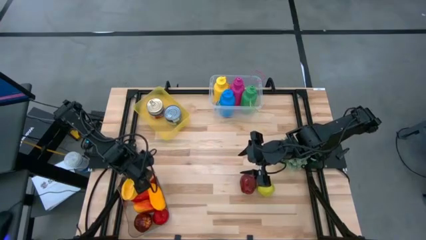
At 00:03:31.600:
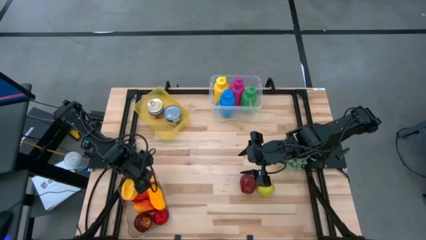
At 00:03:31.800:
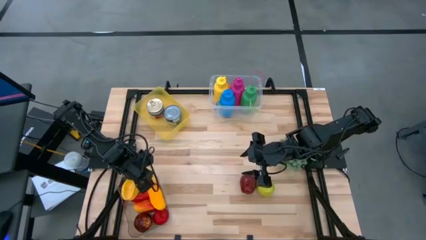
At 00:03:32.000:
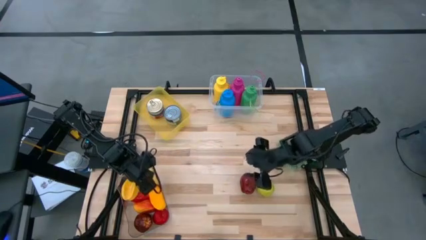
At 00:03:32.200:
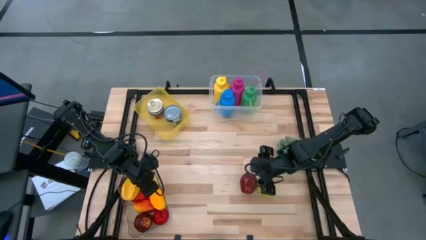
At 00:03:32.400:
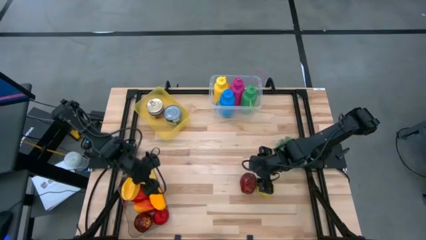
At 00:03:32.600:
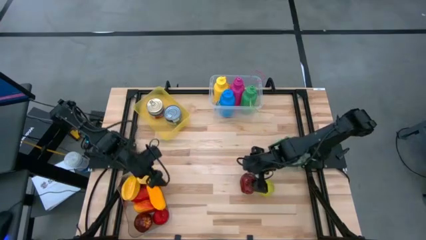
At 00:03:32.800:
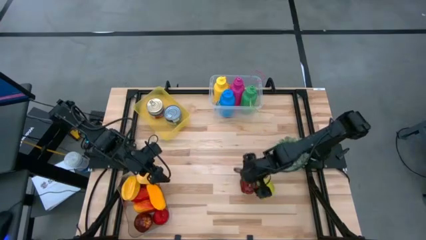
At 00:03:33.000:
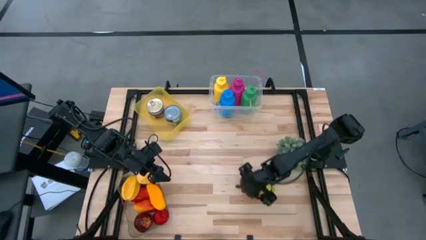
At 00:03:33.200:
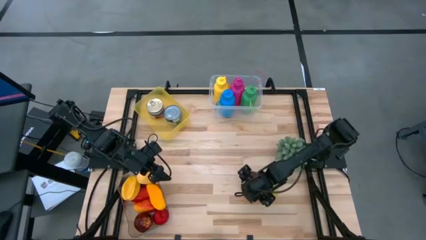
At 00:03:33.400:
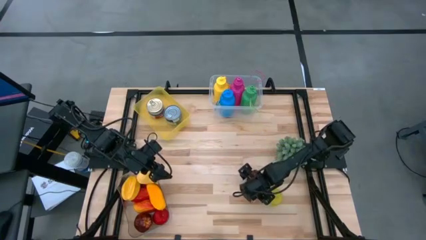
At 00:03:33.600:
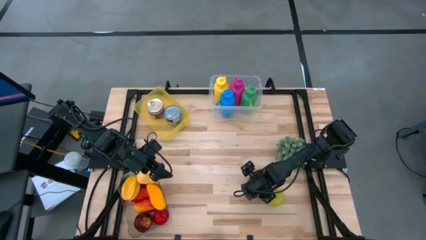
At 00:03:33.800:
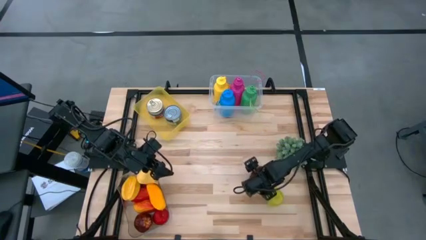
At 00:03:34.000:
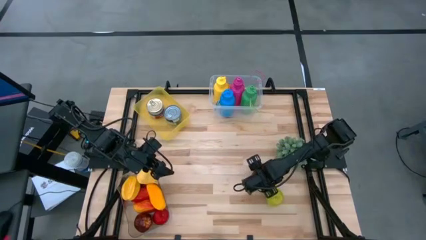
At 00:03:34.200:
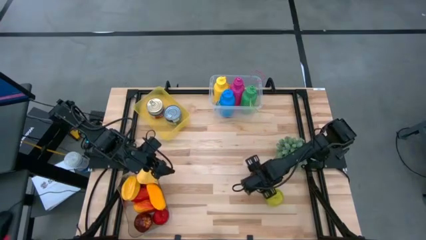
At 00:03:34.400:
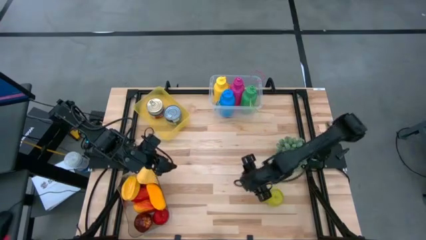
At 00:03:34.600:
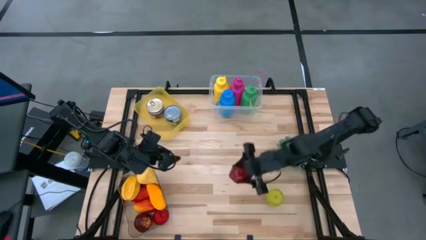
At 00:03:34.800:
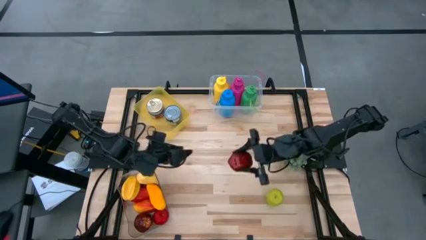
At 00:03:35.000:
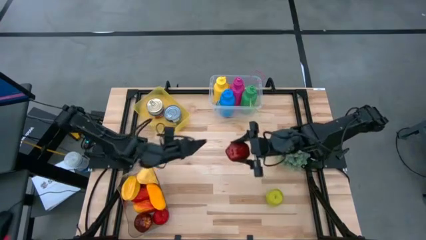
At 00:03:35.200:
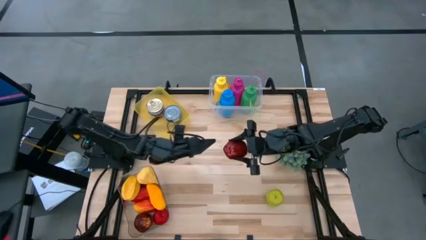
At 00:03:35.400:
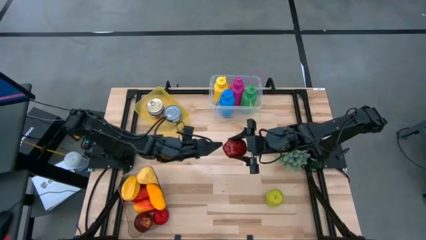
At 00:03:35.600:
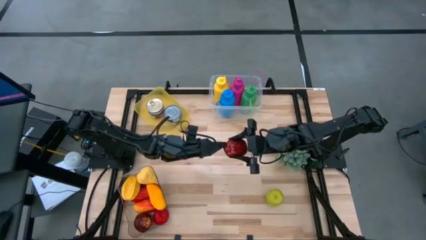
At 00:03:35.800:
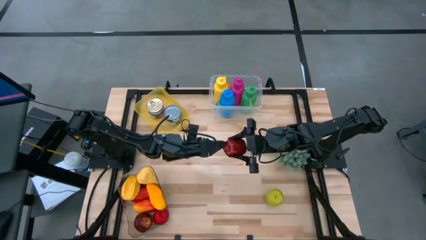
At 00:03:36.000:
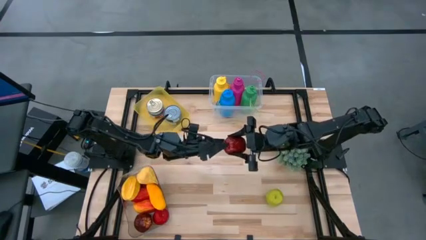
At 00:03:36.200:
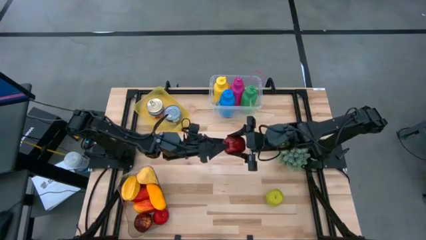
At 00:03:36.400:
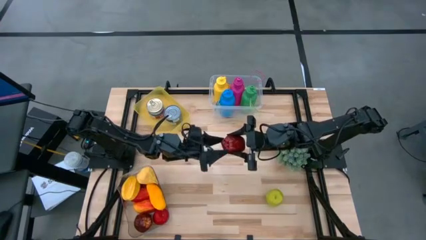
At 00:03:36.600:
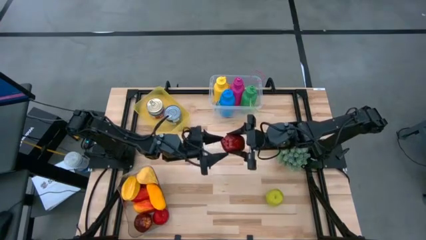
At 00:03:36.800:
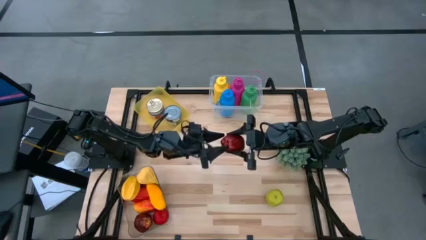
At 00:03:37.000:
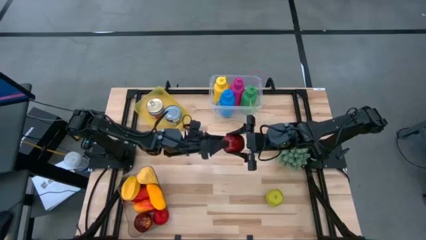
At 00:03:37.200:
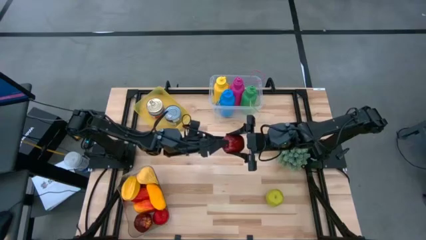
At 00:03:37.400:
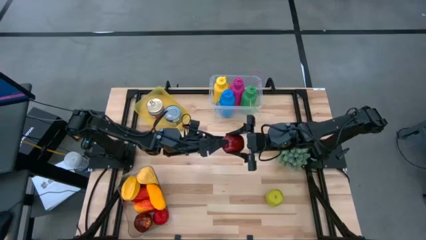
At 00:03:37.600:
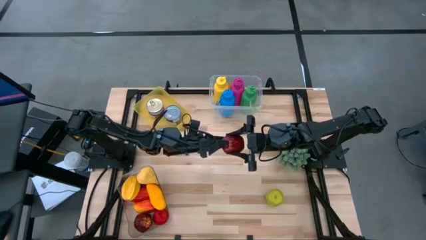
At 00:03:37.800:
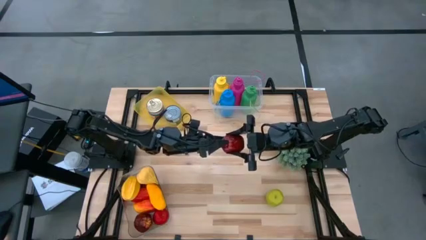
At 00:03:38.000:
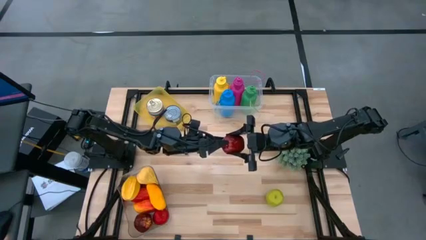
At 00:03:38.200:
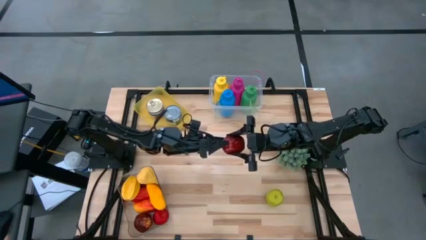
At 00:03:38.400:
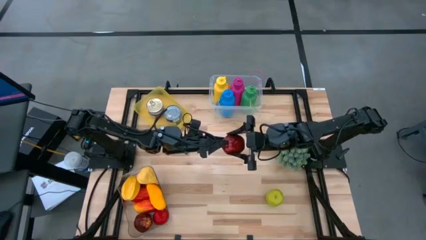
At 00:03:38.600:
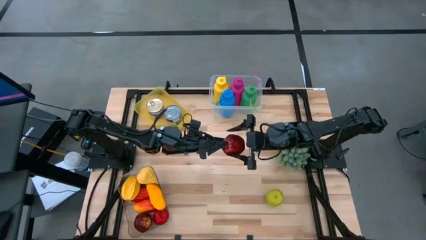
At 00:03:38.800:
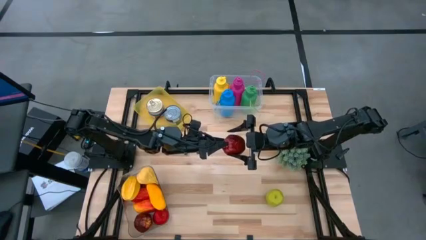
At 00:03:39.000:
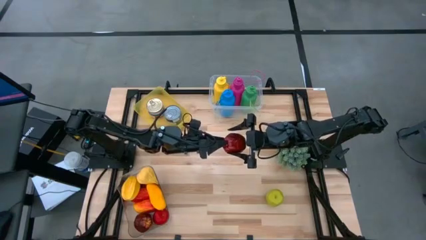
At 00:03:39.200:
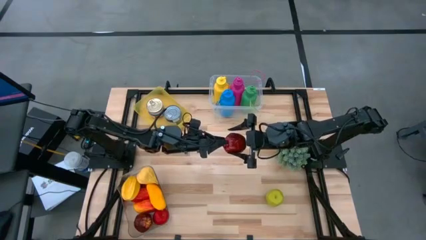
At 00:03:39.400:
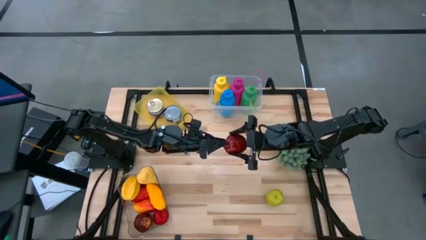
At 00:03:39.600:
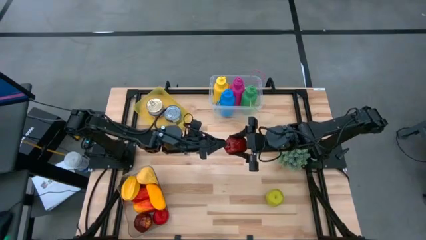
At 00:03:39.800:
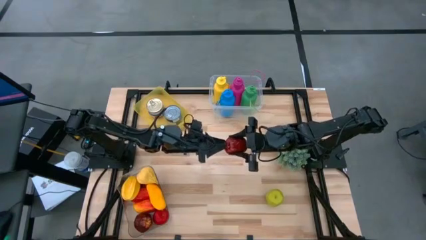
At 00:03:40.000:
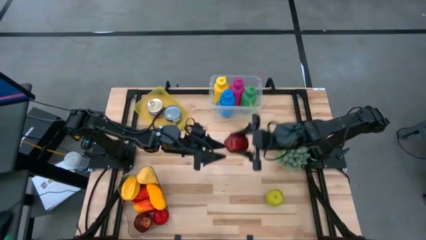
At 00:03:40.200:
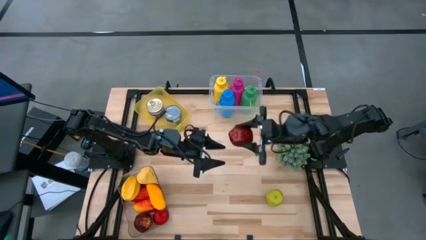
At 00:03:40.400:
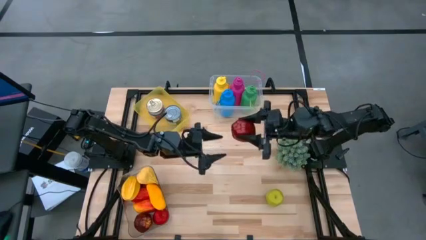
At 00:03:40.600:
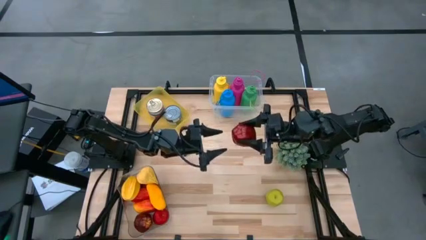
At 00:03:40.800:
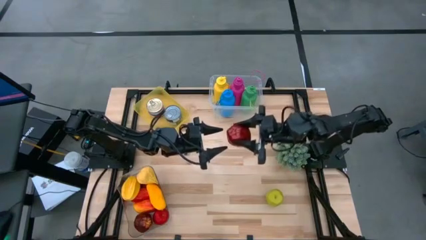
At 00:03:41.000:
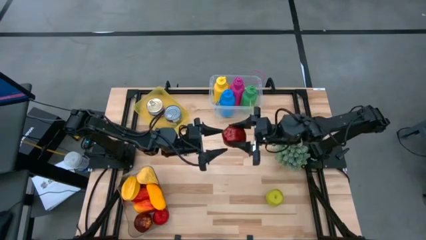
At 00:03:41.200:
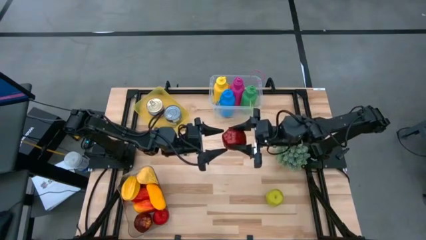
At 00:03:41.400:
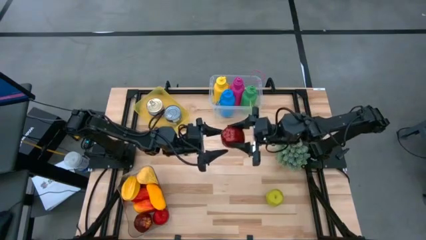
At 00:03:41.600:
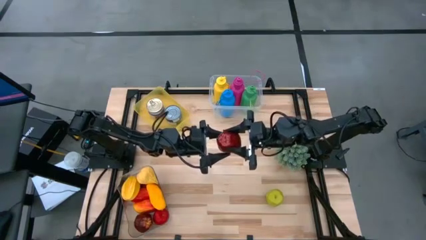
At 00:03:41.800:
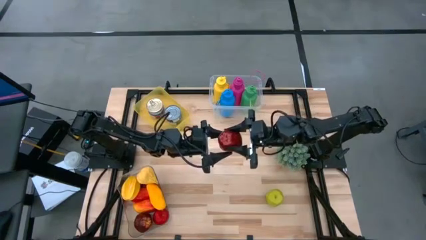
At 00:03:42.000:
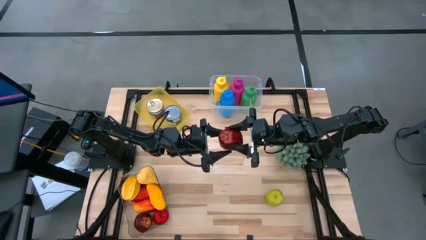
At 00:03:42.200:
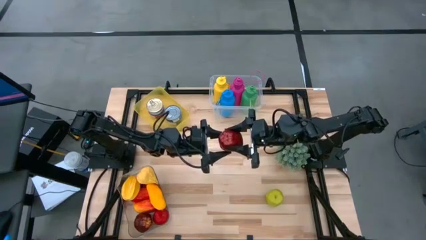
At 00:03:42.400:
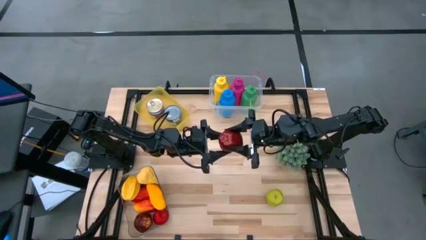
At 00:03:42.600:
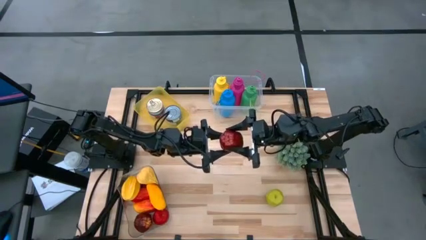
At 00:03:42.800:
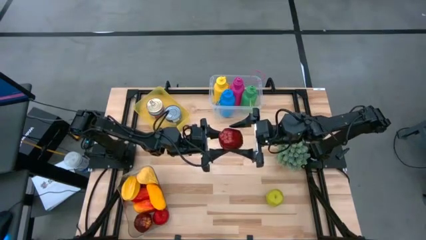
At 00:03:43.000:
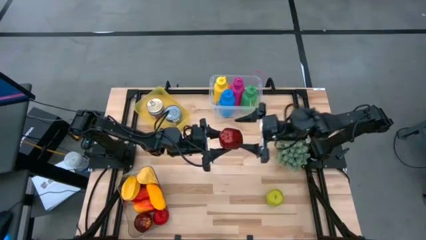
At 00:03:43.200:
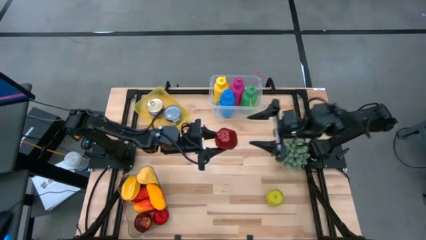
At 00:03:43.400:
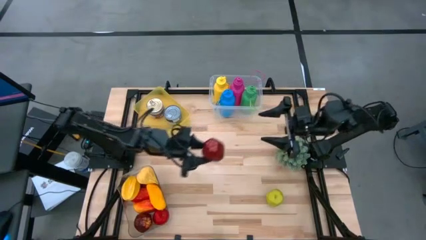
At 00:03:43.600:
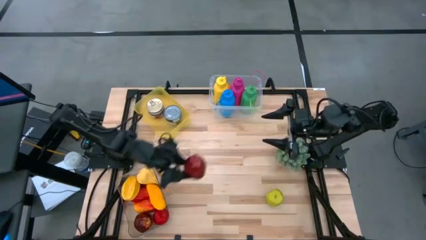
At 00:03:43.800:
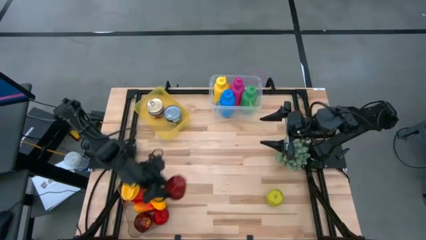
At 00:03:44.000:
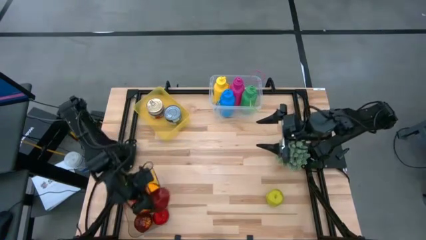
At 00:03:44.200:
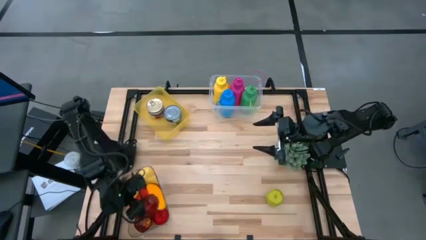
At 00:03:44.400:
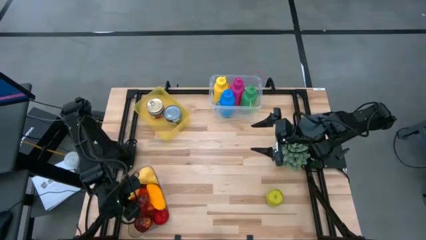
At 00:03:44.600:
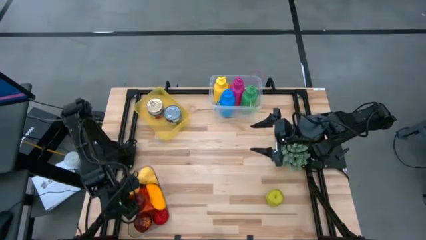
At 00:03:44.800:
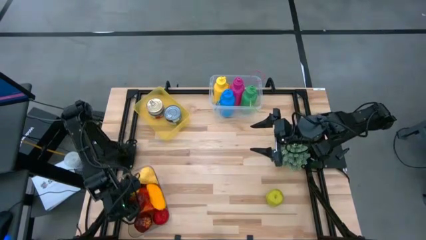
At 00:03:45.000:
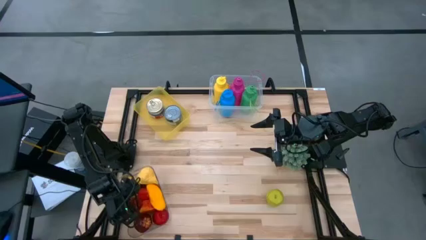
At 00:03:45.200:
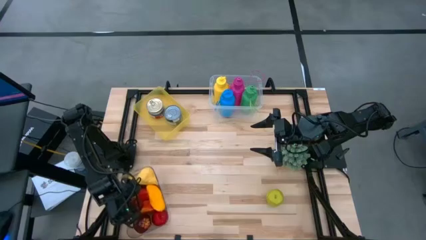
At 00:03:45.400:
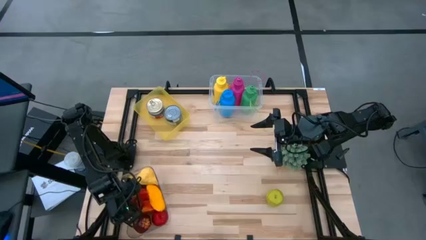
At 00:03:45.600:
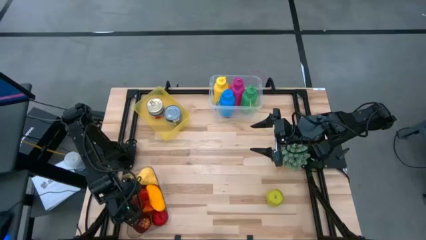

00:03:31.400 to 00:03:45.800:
Task: Pick & Place Food Item
Put the red apple into the transparent bin
